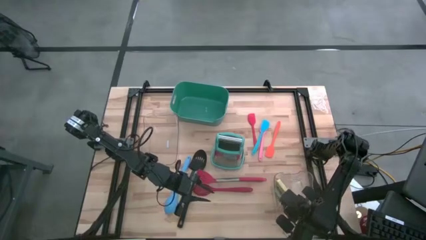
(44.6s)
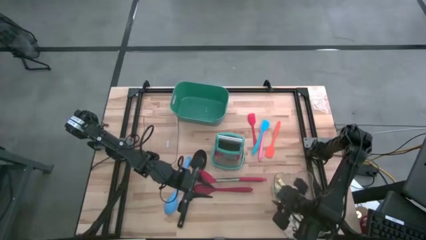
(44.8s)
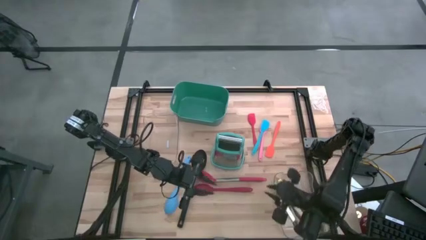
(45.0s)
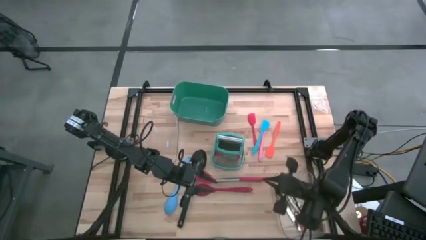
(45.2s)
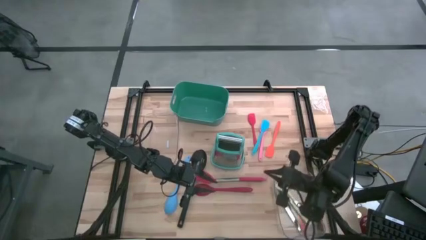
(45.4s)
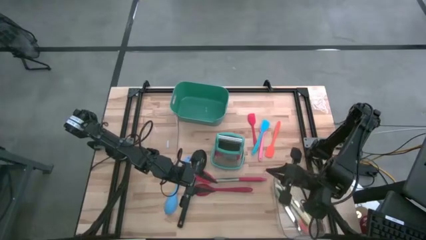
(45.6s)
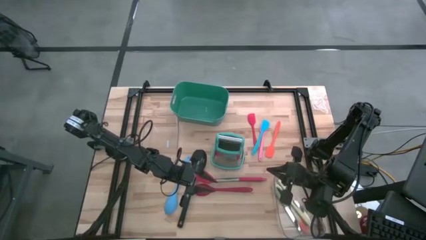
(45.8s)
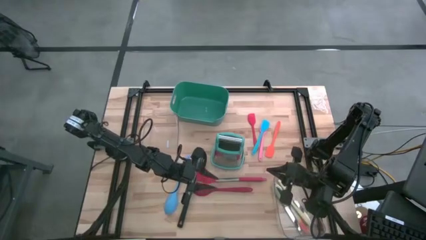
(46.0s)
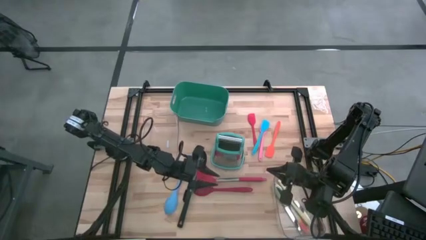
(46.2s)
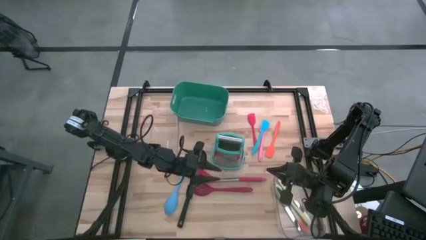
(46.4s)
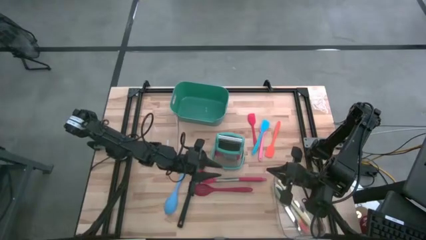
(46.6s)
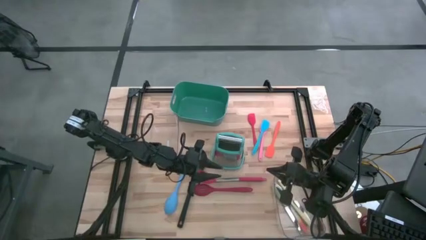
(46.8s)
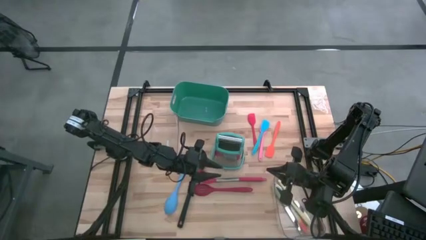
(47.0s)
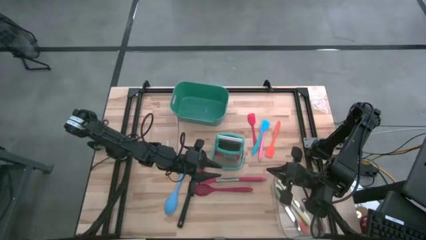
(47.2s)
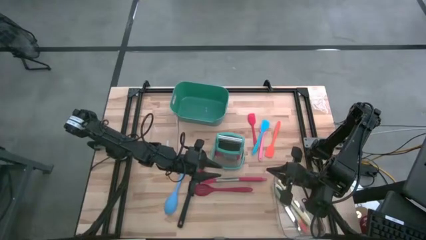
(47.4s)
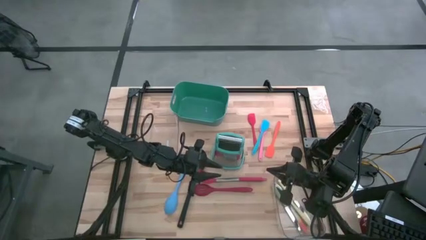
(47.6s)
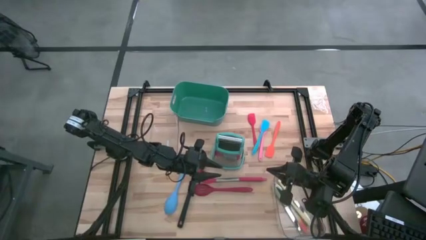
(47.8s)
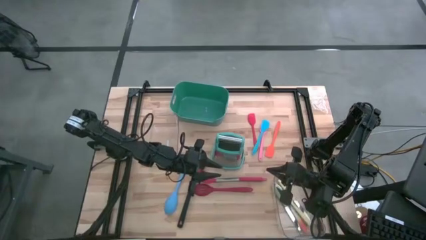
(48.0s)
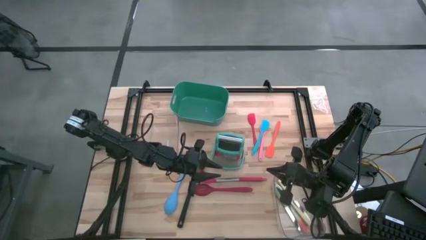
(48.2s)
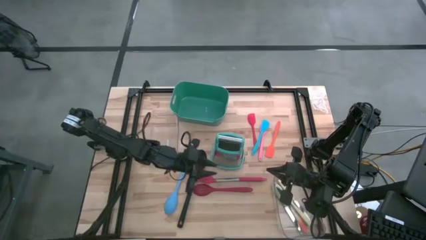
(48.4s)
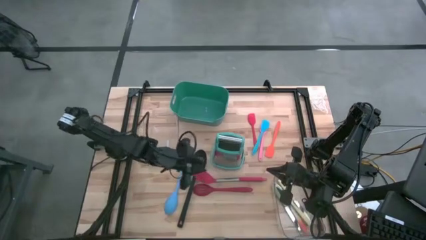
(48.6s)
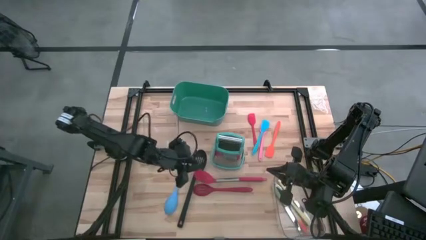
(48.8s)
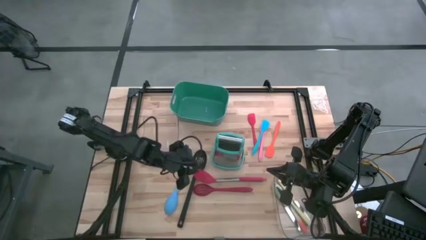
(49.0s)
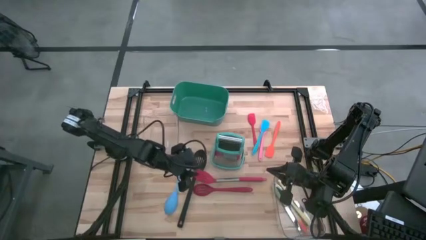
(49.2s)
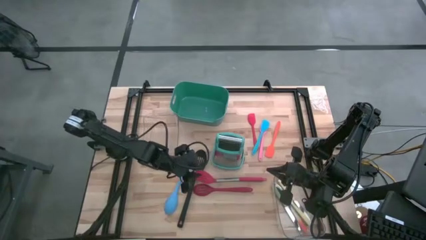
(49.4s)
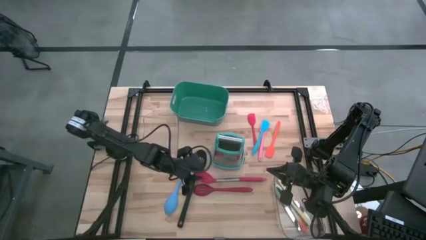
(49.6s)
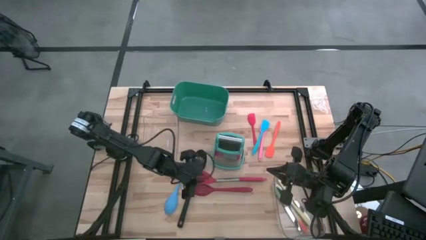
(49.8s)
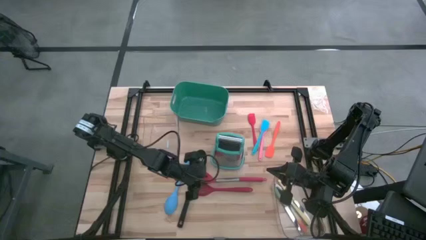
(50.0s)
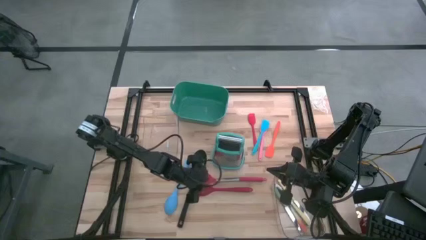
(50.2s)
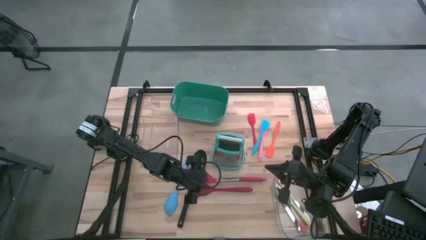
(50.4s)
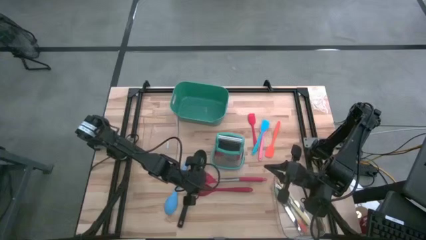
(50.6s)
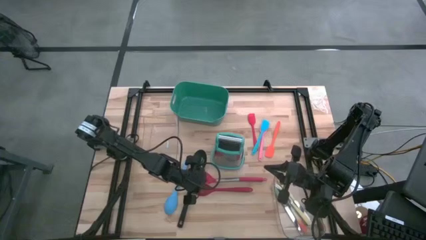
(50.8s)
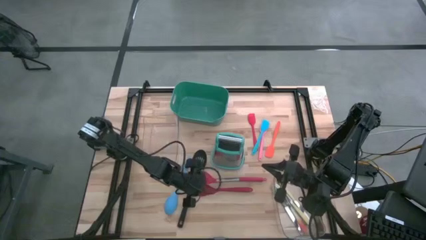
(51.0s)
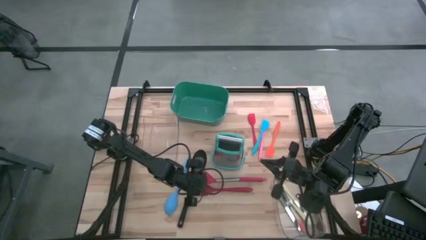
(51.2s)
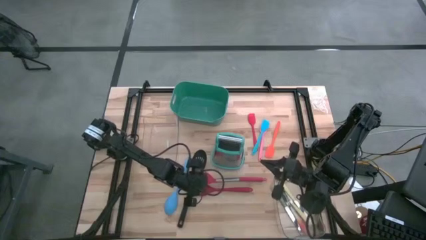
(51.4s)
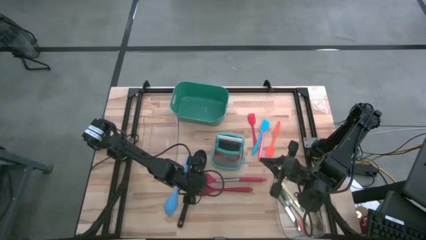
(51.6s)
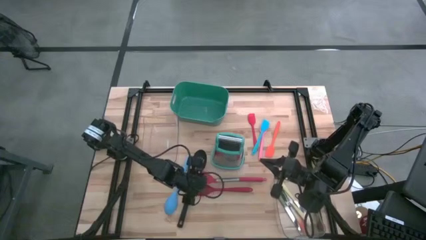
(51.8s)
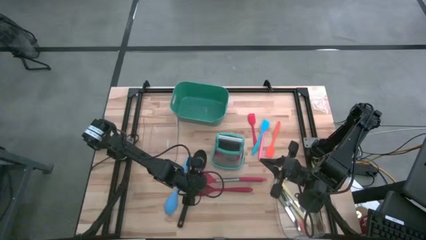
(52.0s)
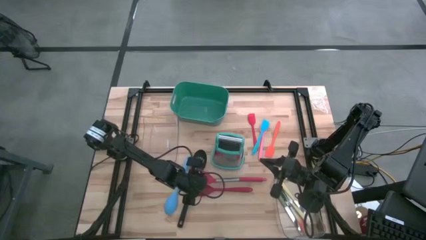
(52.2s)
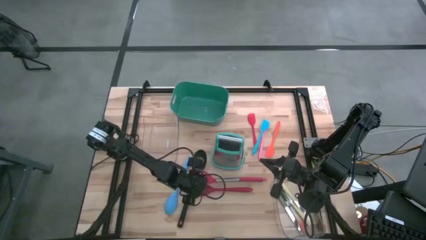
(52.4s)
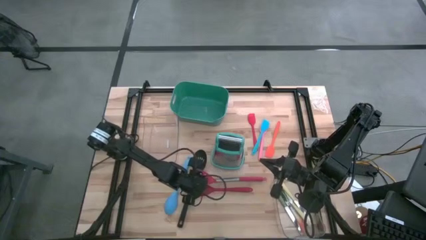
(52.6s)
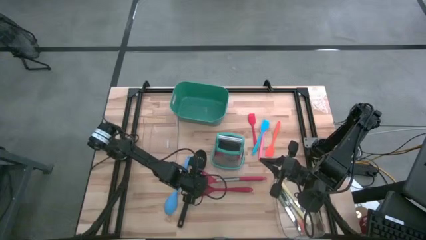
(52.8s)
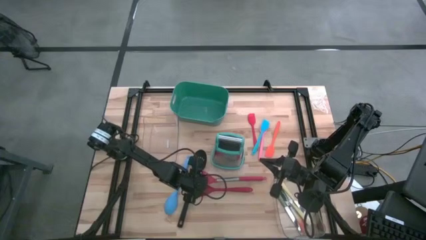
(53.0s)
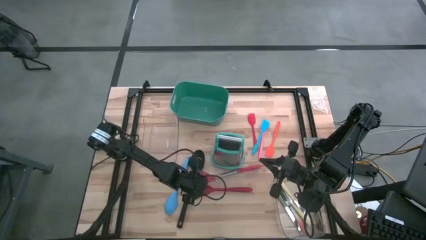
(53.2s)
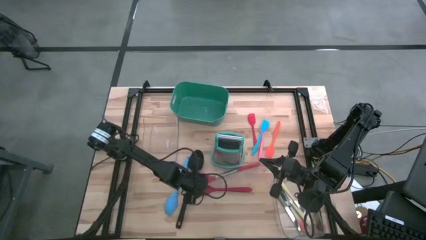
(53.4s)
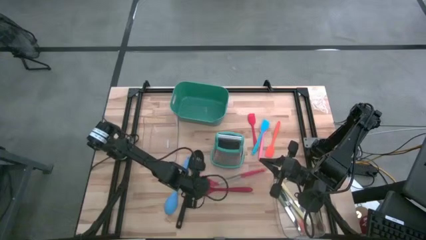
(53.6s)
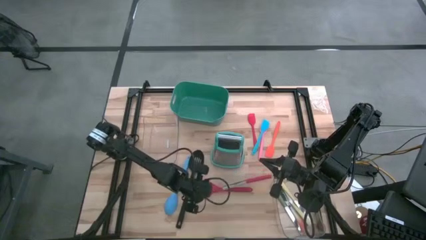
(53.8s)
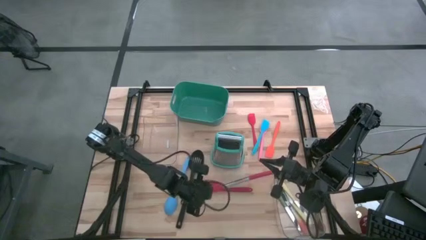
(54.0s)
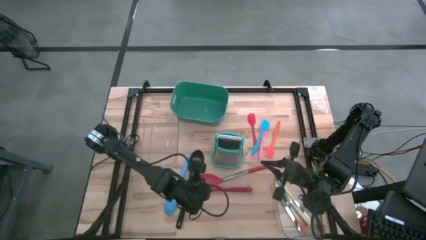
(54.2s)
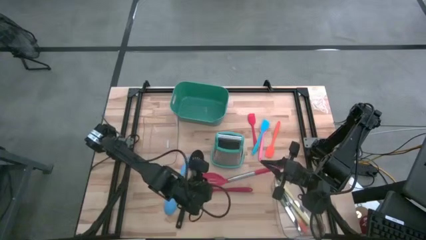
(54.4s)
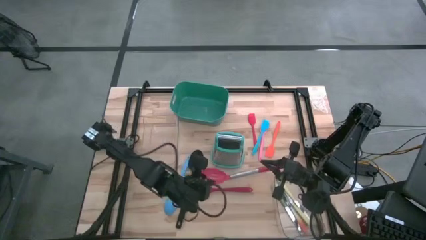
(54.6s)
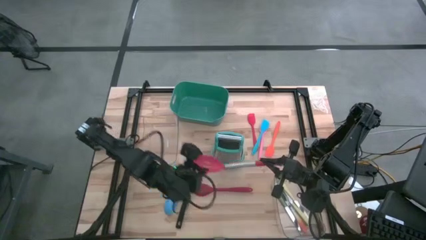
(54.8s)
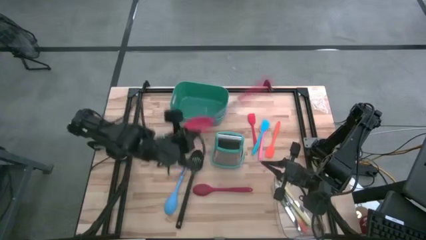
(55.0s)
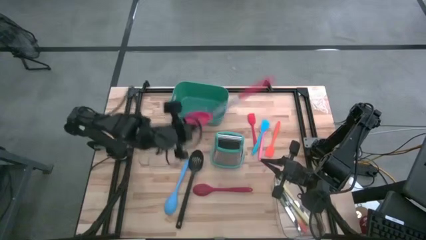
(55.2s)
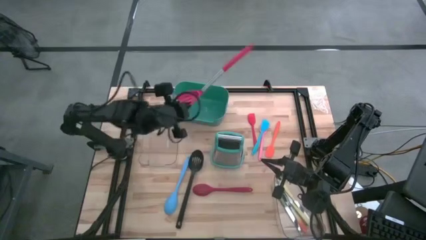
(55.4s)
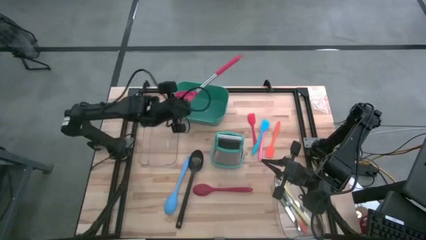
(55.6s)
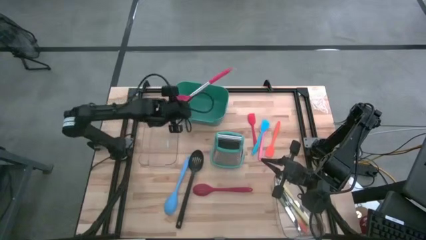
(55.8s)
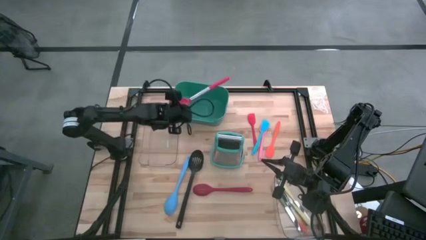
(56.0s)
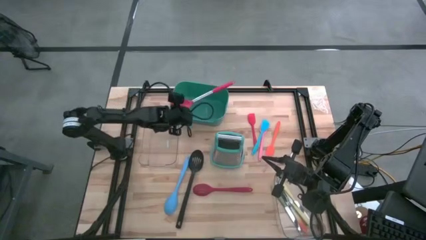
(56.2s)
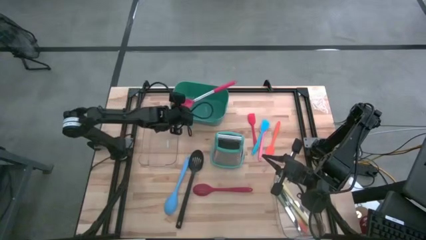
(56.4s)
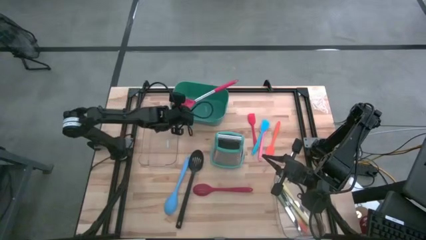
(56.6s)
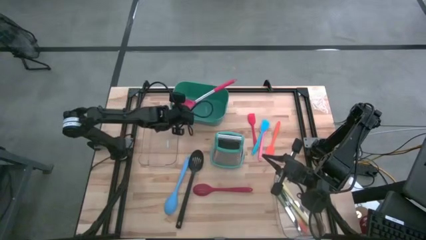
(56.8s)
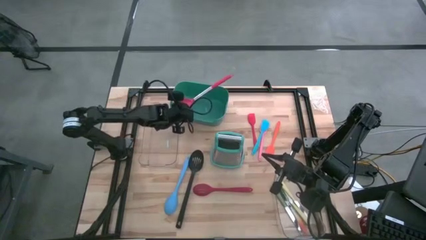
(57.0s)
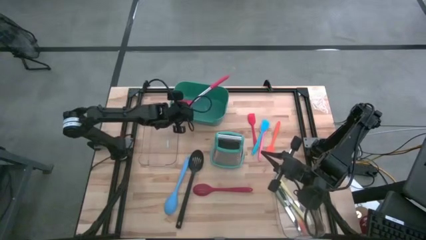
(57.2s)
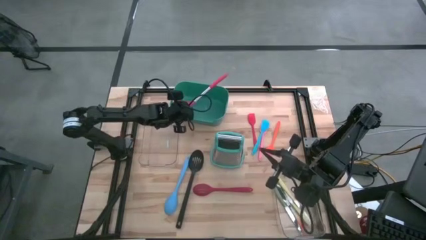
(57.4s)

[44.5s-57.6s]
Task: Pick & Place Kitchen Items
Put the orange slotted spoon into the green bin

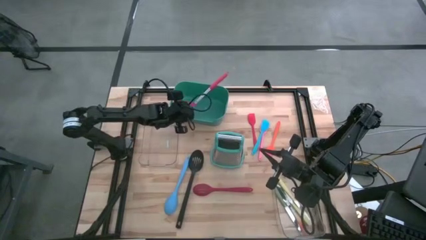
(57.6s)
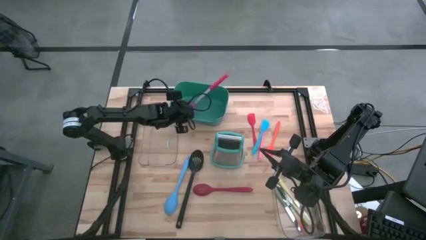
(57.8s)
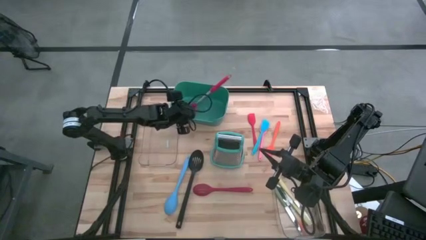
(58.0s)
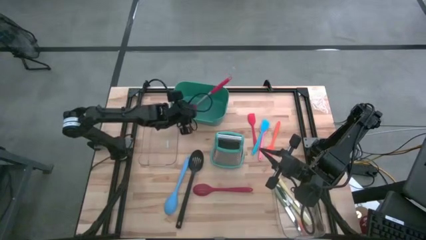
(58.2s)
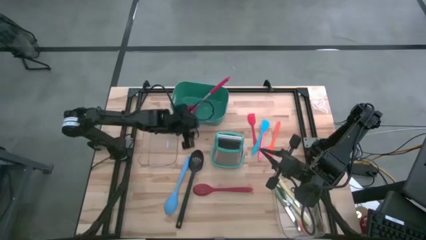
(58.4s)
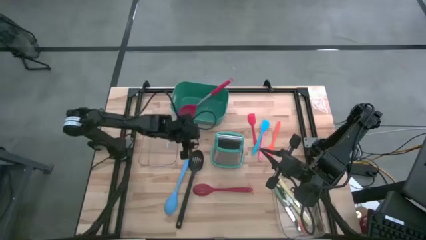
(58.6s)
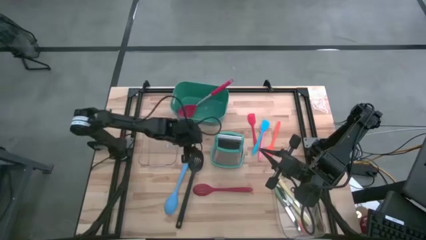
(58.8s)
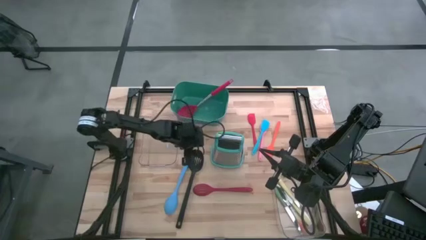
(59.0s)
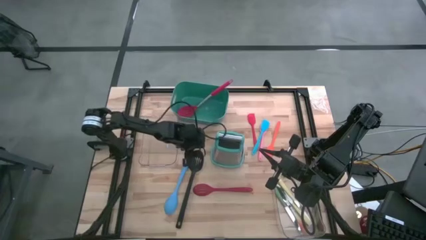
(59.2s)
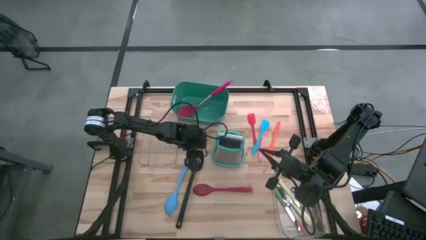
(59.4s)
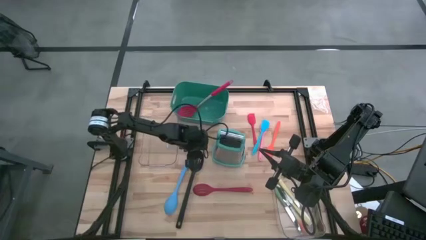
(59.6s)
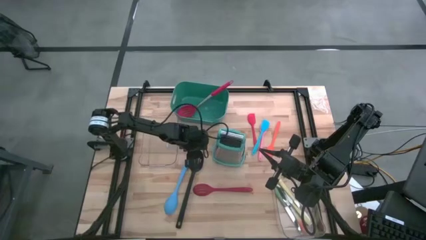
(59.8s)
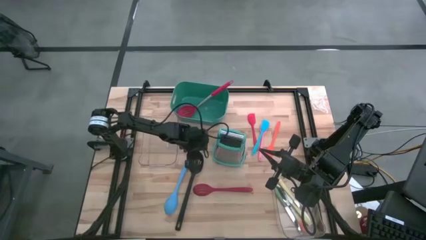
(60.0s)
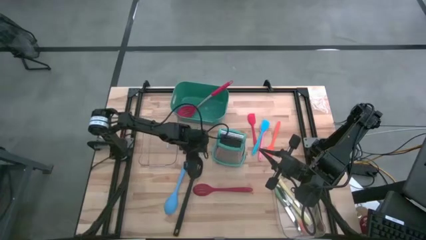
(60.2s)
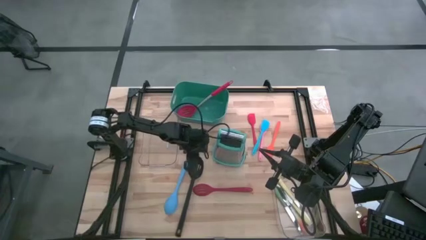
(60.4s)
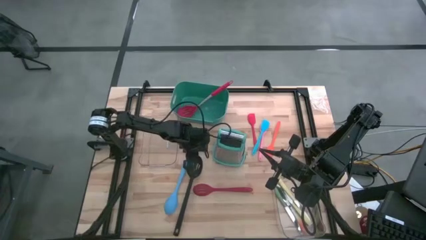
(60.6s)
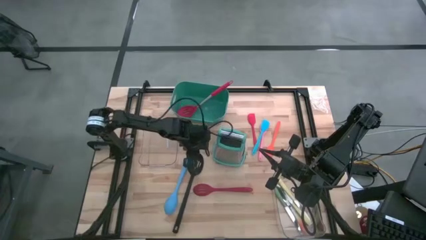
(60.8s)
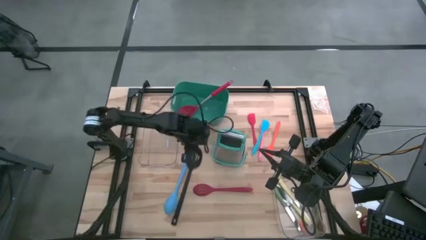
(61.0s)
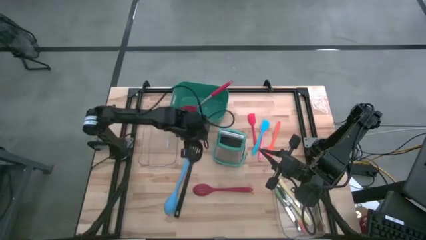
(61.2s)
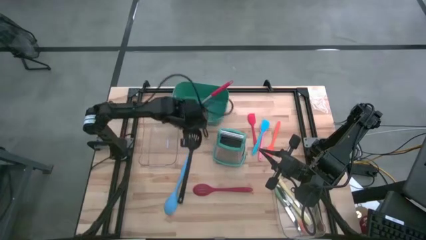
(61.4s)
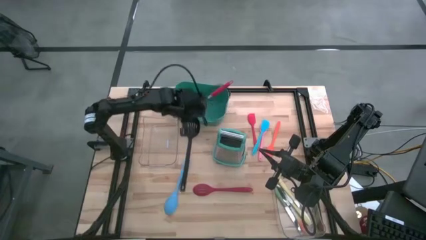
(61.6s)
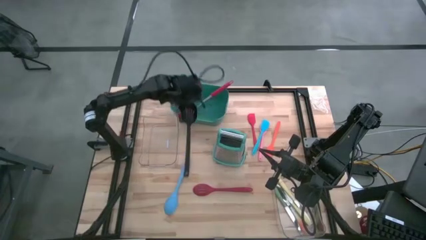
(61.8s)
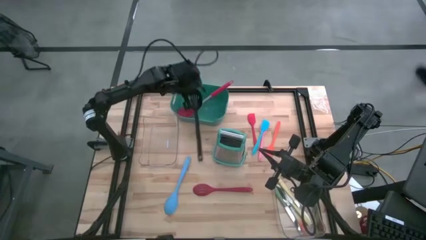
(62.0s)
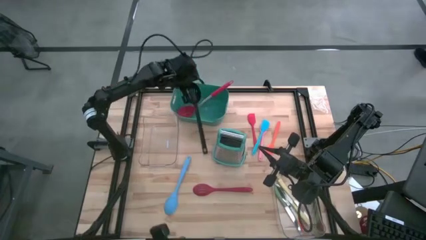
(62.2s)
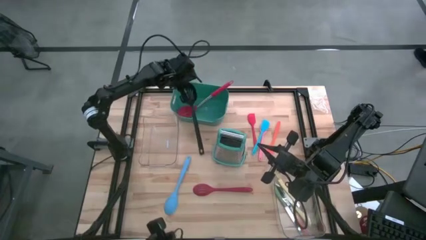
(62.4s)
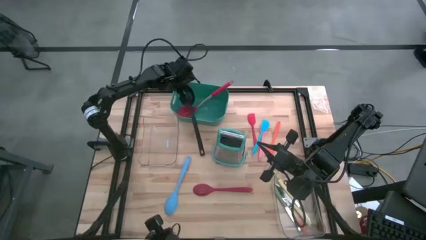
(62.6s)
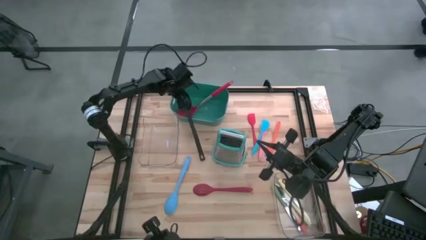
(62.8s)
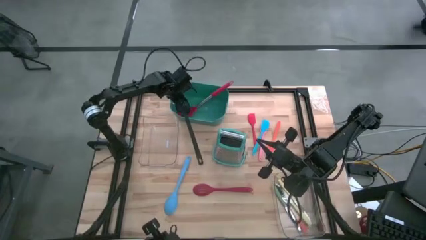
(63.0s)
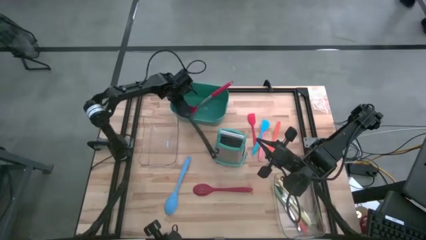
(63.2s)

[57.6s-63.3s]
Put the black slotted spoon into the green bin
